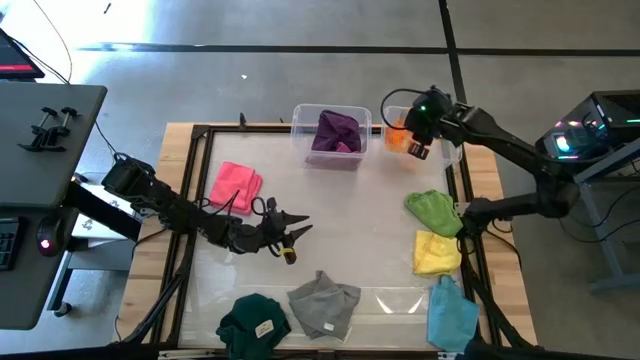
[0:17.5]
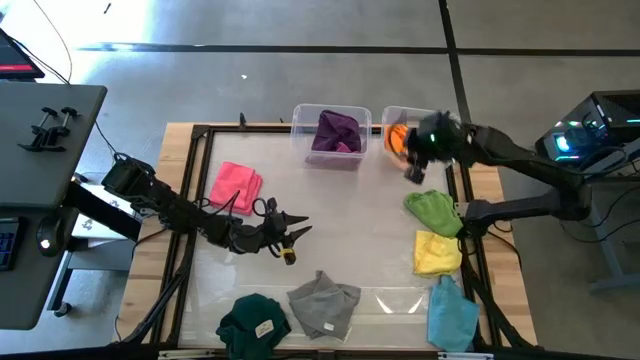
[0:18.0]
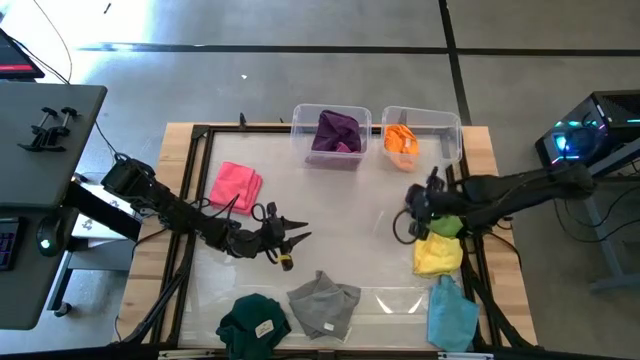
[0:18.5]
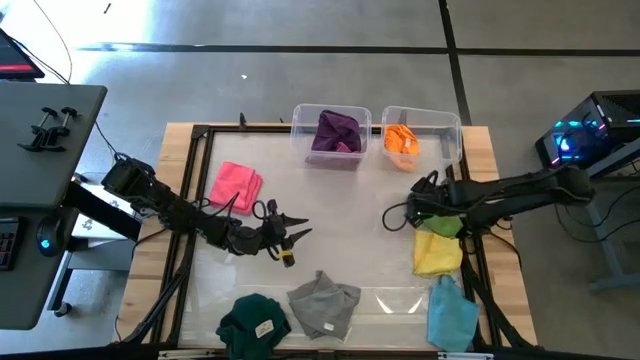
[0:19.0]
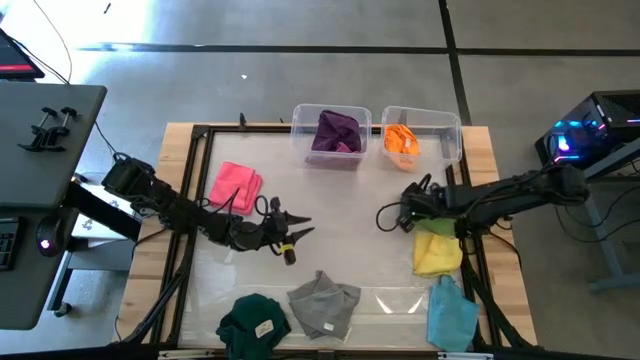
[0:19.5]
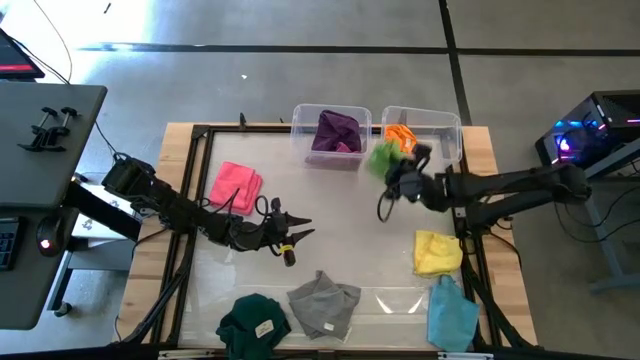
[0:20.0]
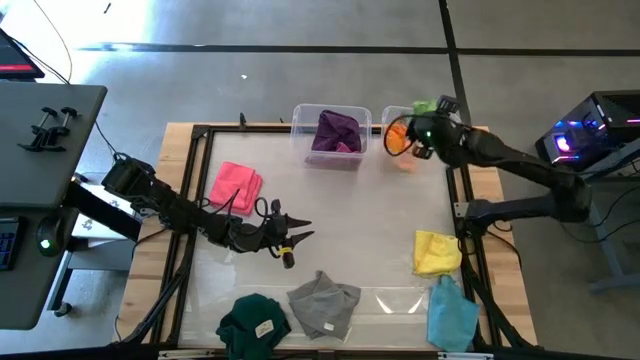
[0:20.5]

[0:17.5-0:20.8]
Task: Sort towels by color in basket
Put the green towel into the right transparent bin

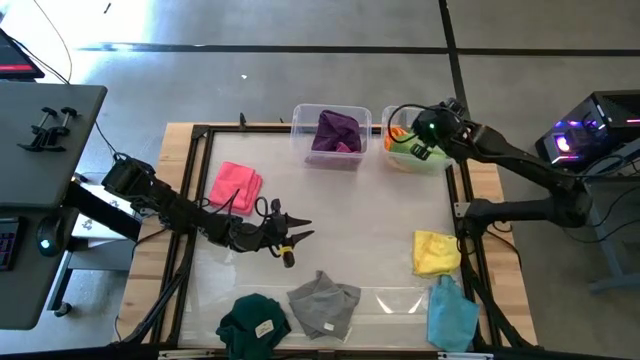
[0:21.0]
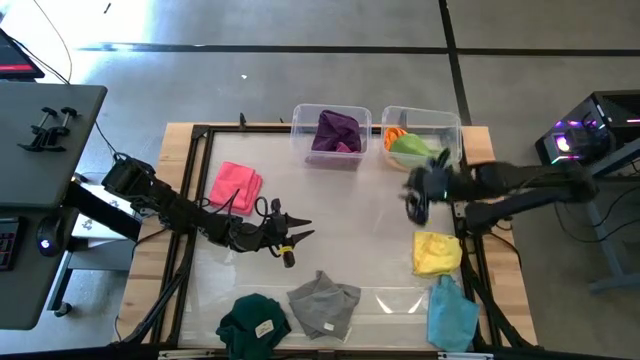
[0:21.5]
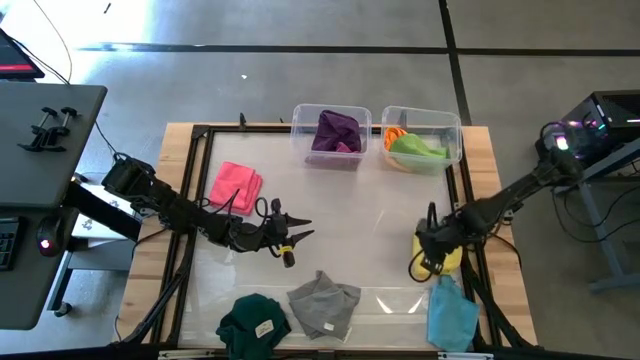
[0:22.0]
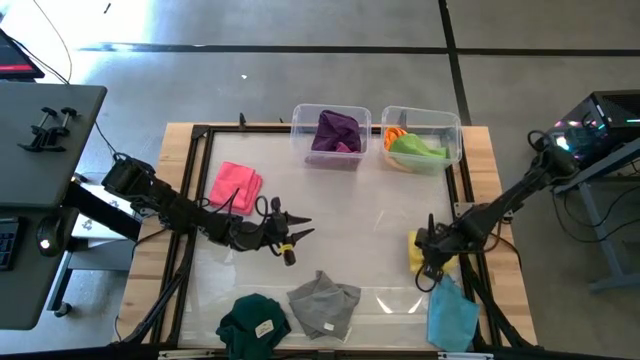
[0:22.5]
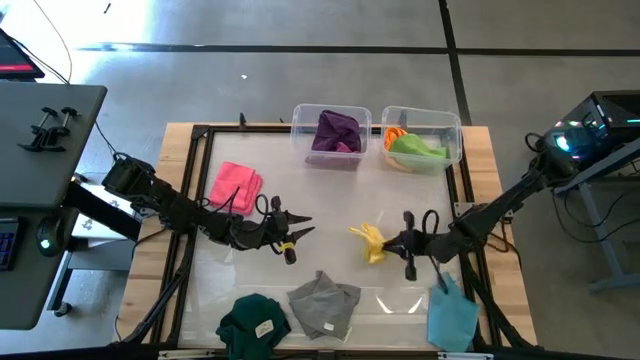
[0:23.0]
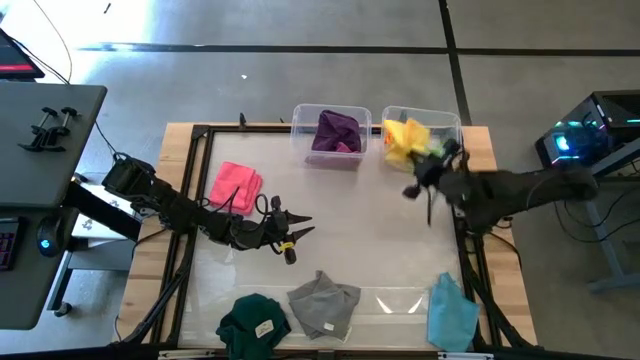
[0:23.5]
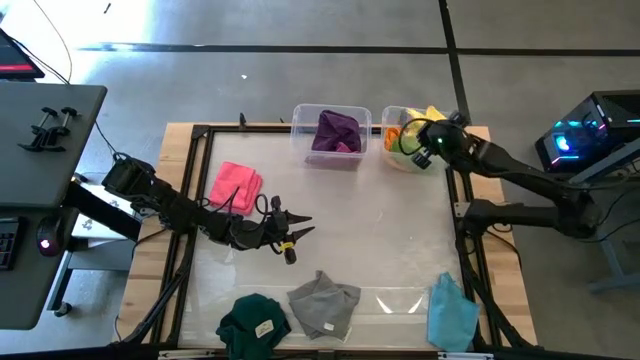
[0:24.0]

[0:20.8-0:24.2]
Put the yellow towel into the right transparent bin

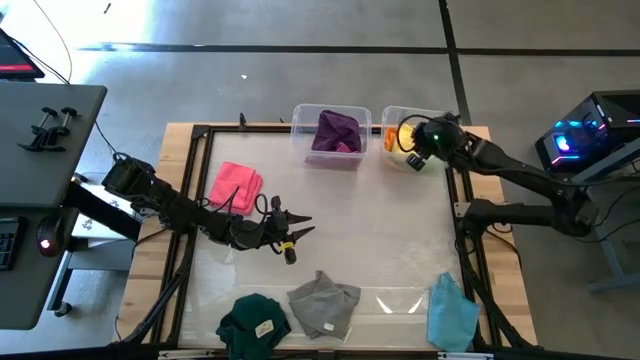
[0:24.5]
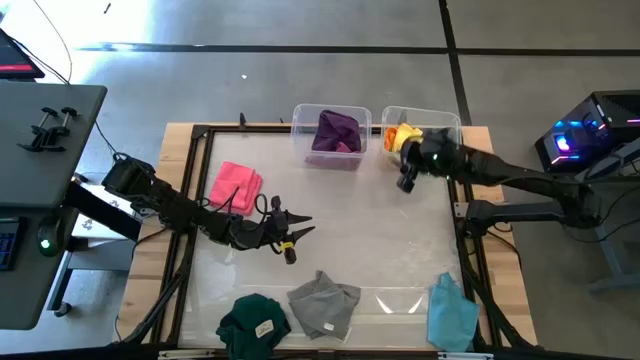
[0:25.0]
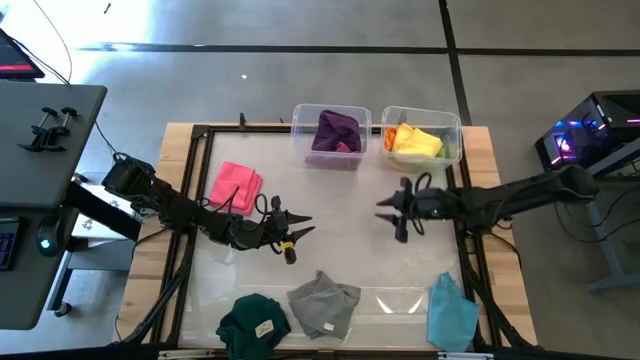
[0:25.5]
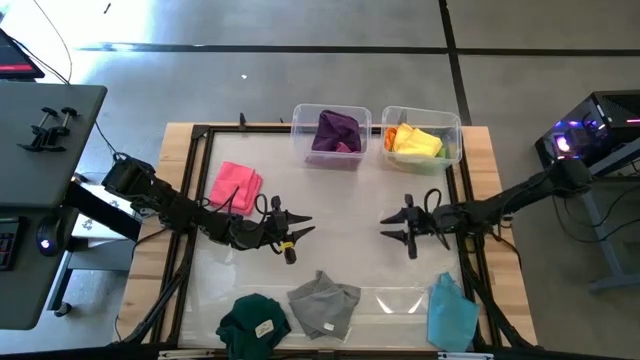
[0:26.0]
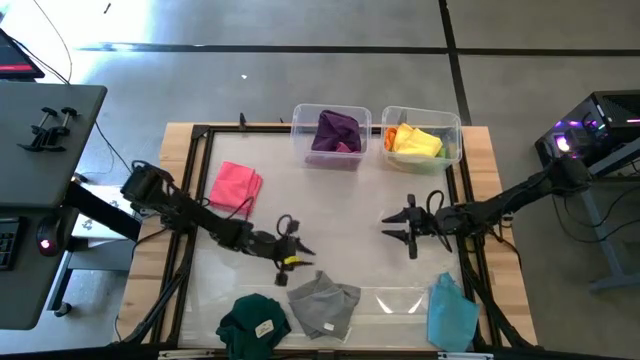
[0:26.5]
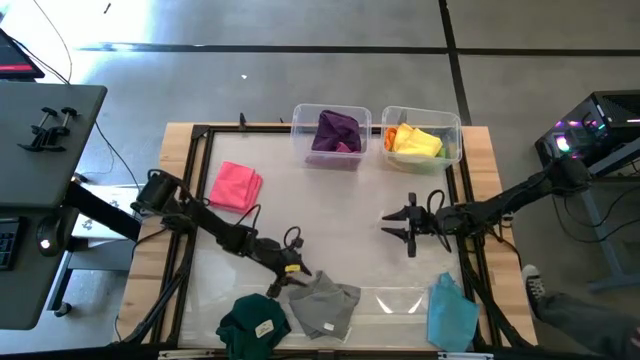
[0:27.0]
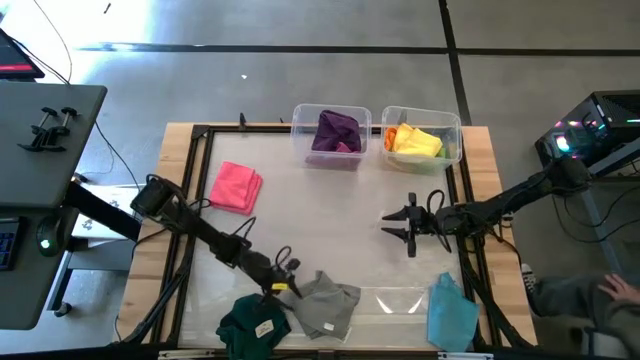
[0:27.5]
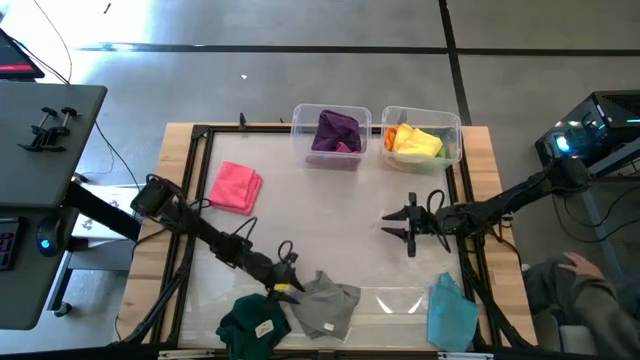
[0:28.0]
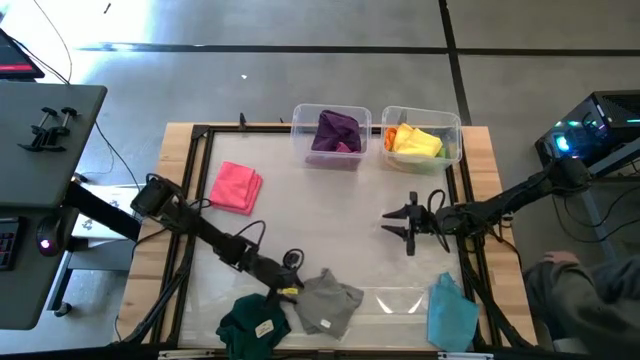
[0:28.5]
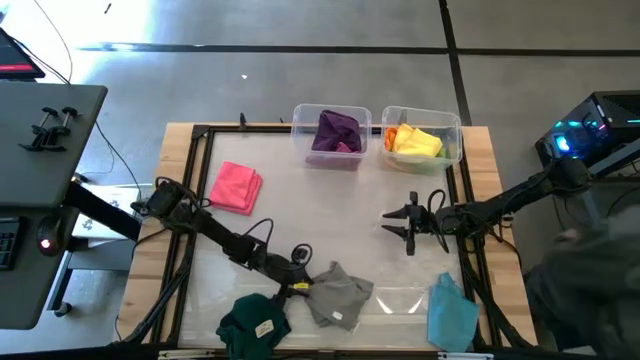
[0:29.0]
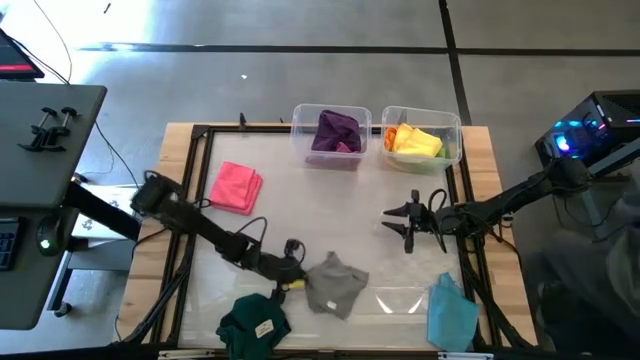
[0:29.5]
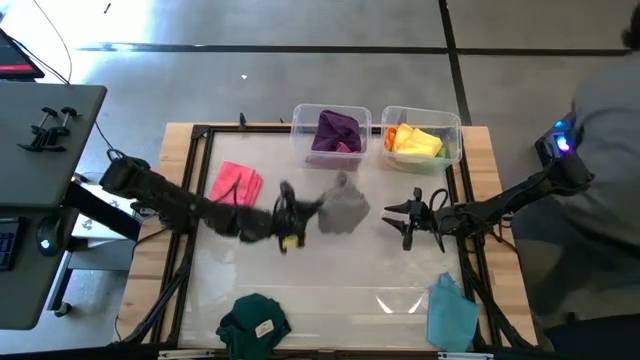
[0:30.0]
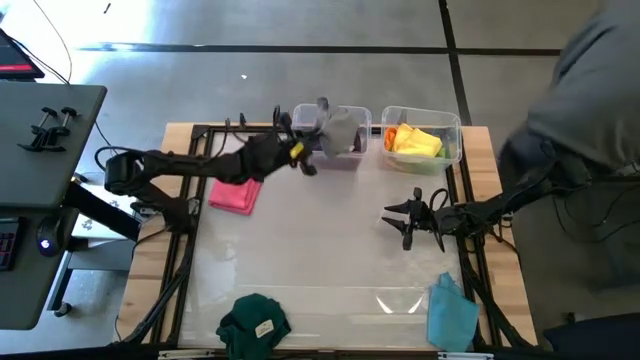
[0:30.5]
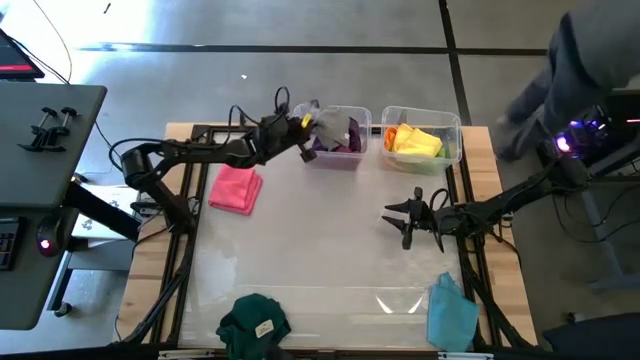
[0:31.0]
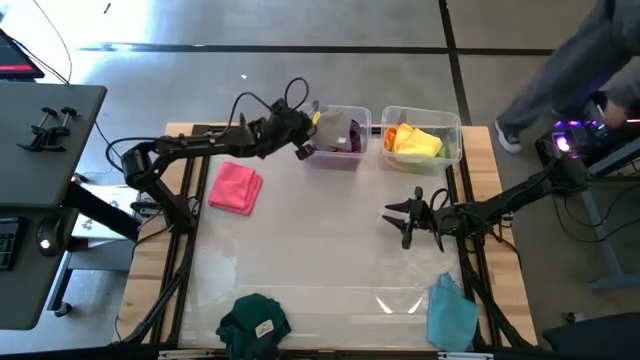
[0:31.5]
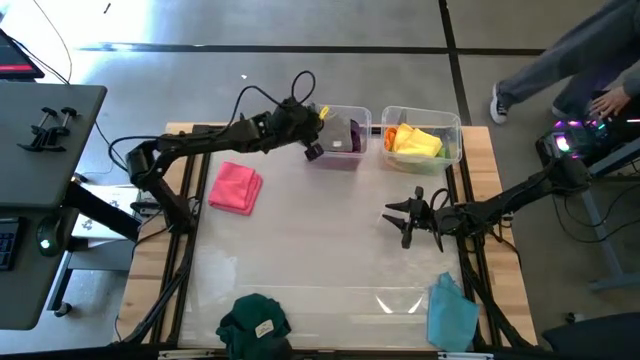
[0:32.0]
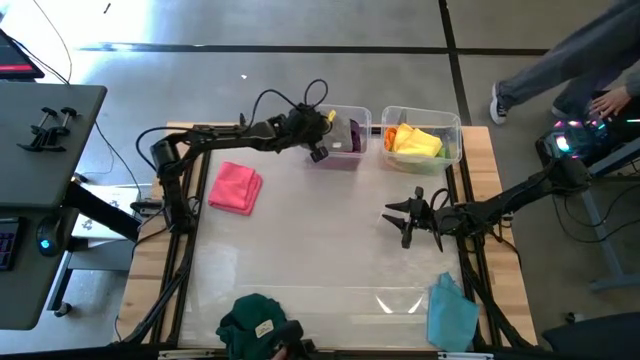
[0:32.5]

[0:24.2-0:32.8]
Put the gray towel into the left transparent bin

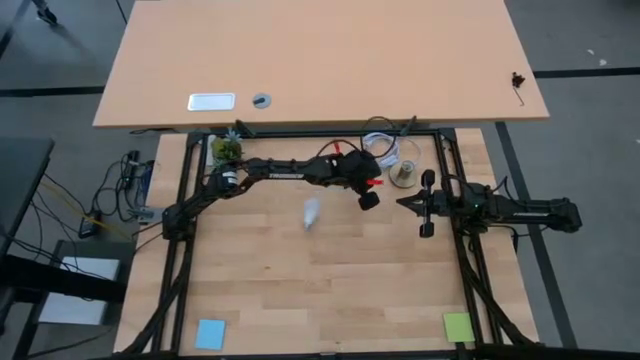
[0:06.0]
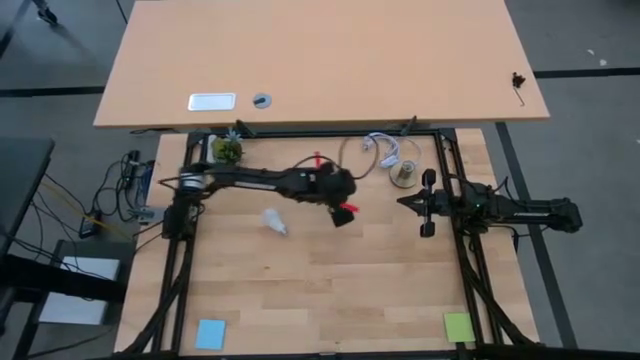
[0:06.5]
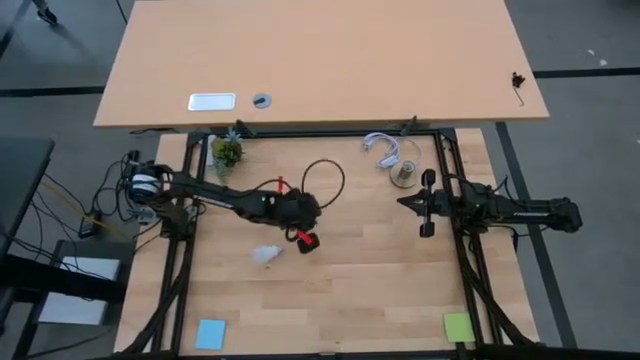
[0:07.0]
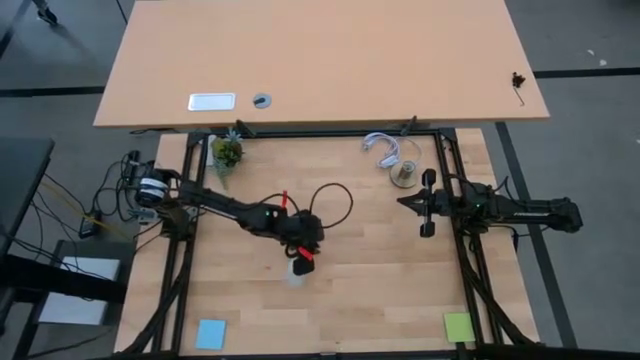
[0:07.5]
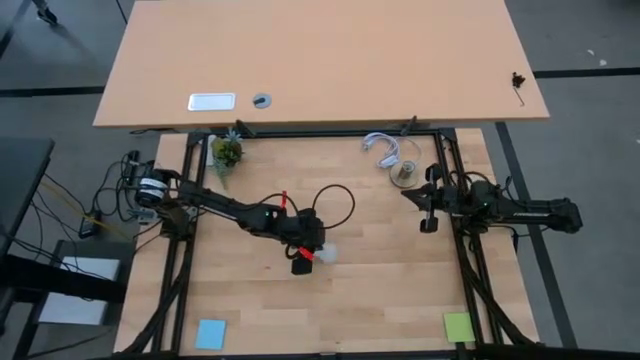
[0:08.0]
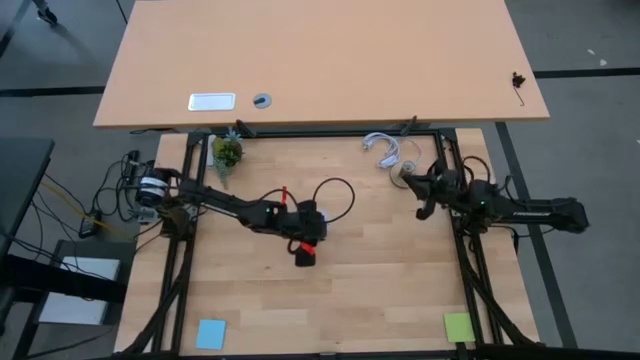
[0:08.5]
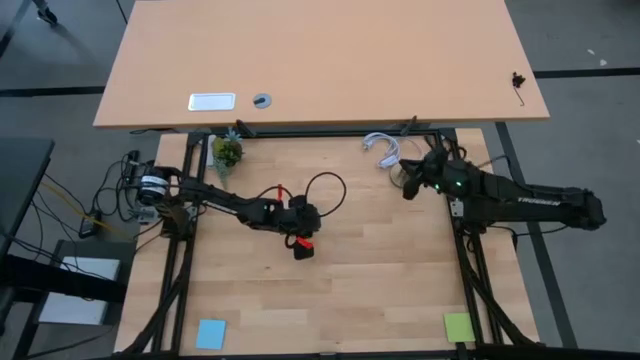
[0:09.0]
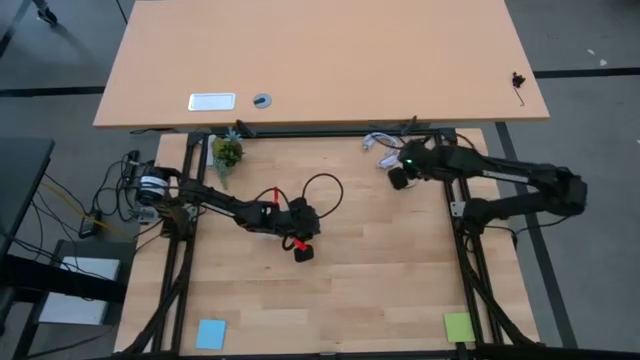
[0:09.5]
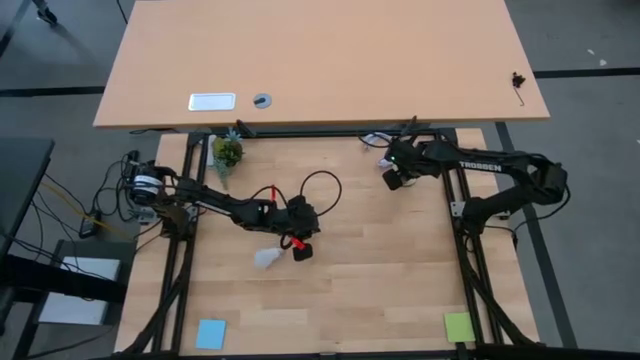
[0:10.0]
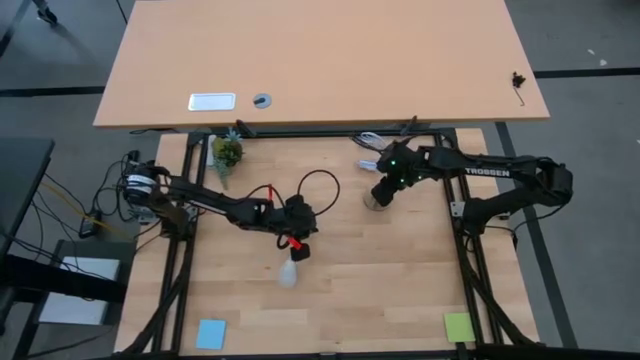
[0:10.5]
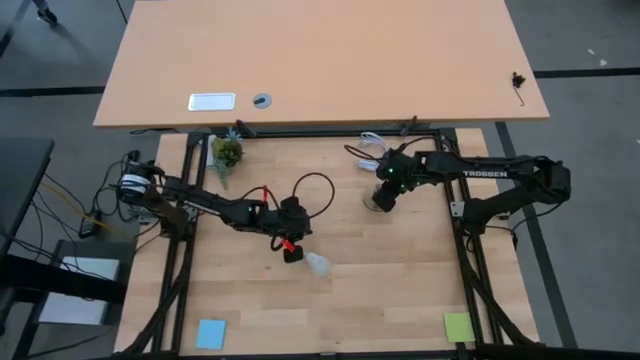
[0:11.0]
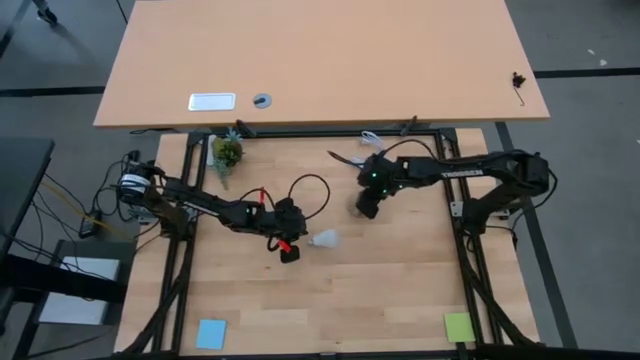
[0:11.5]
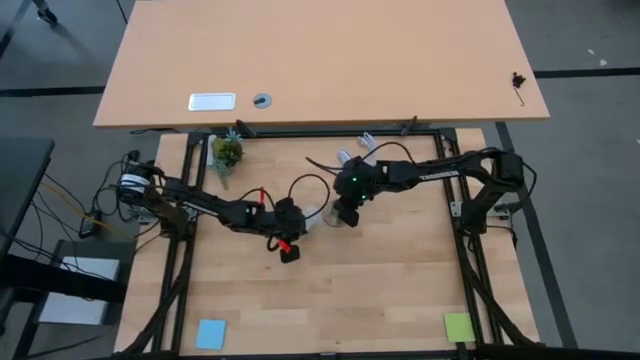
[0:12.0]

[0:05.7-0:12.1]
Task: Screw lightbulb
Move the lamp socket to the center of the table
